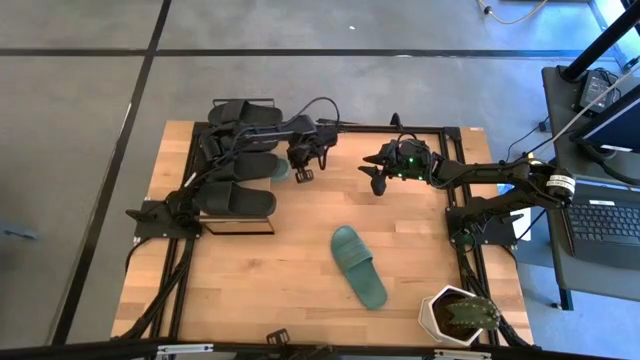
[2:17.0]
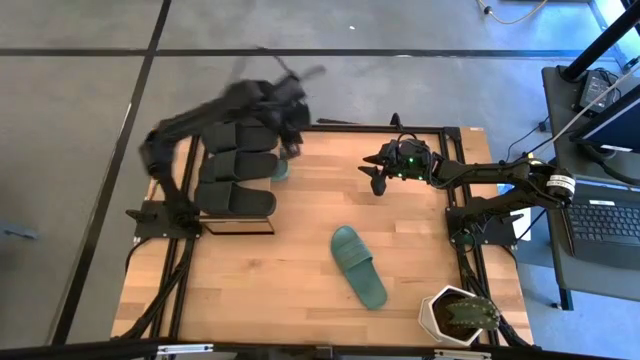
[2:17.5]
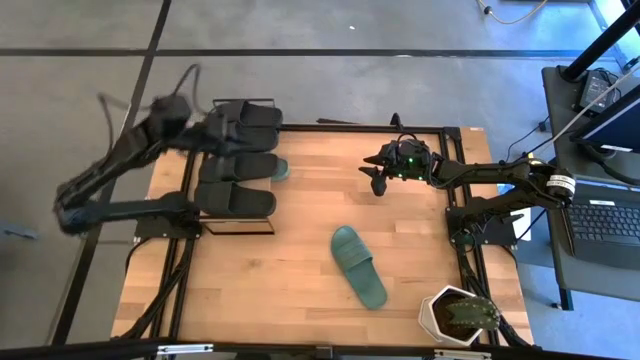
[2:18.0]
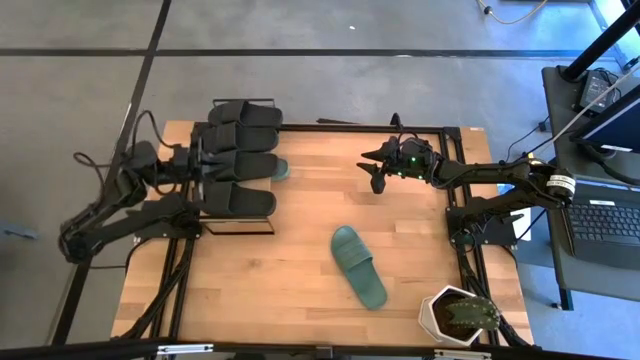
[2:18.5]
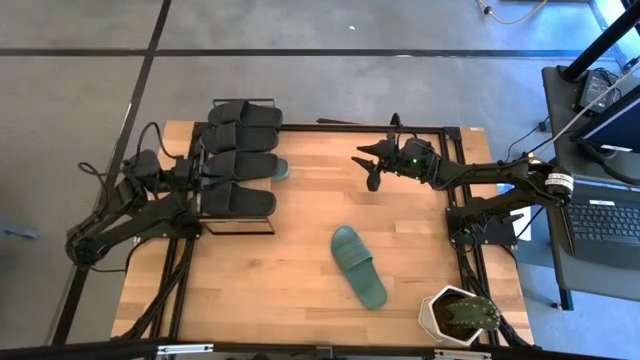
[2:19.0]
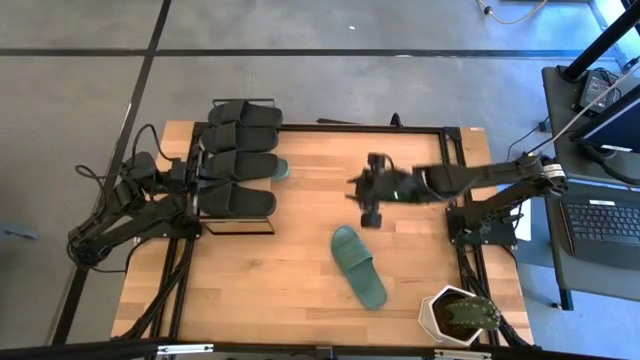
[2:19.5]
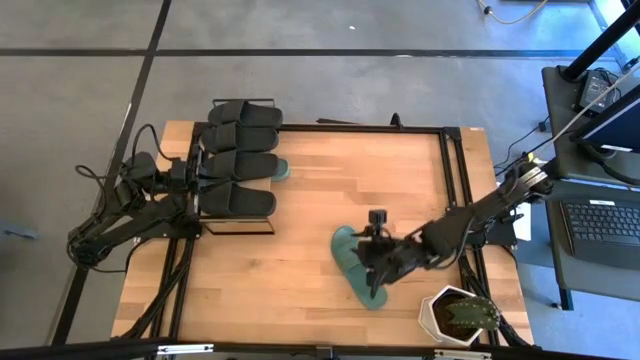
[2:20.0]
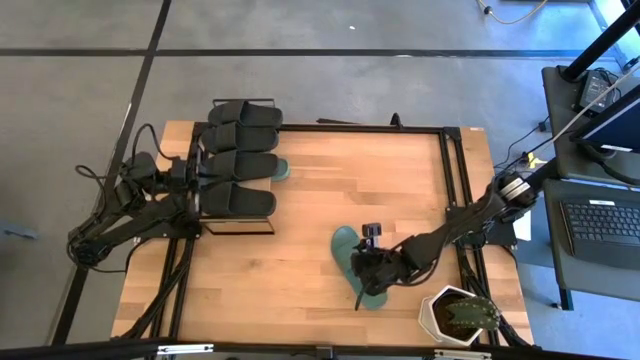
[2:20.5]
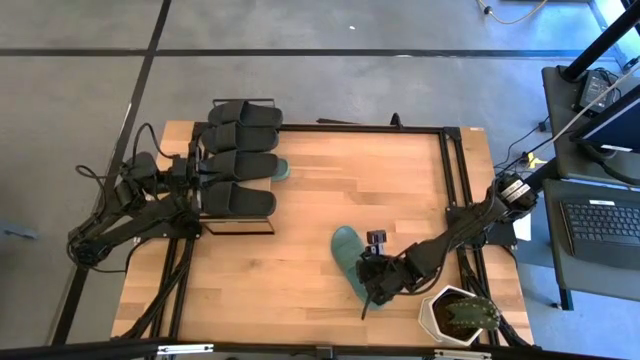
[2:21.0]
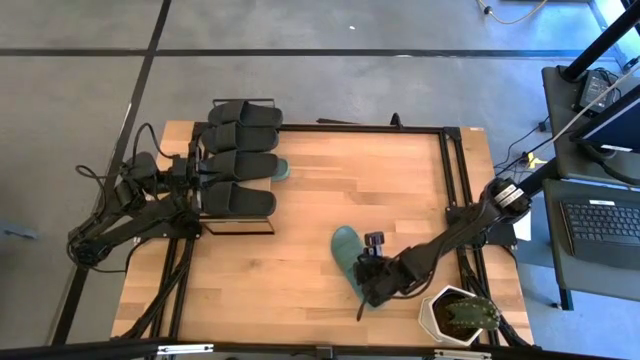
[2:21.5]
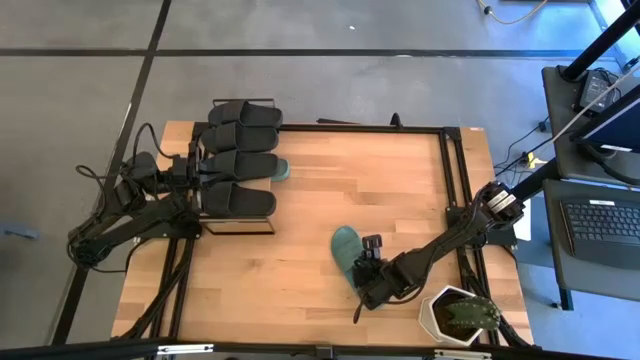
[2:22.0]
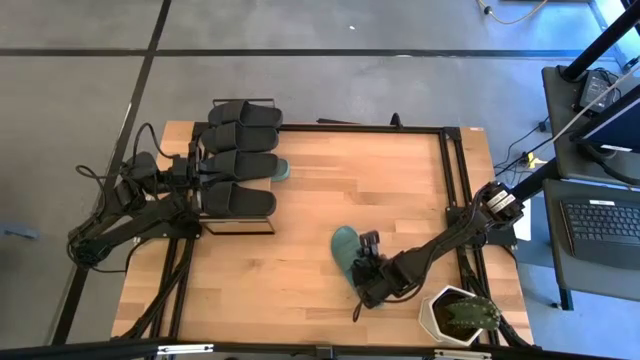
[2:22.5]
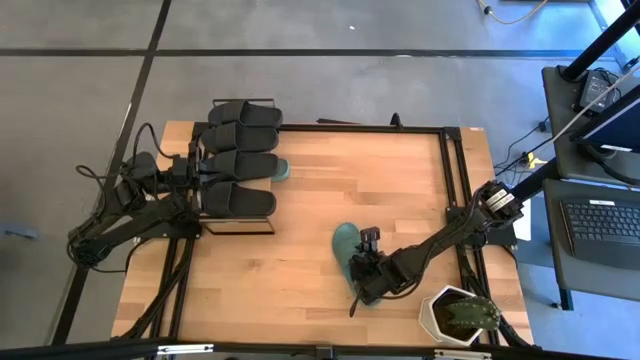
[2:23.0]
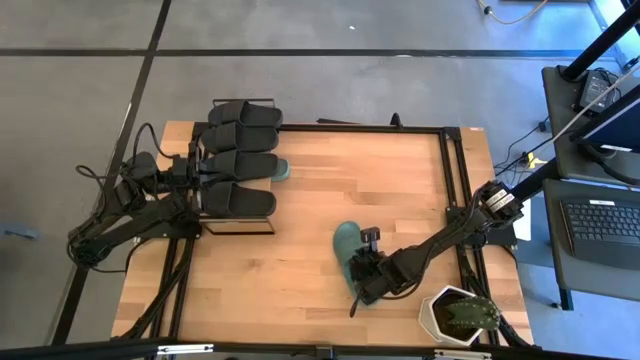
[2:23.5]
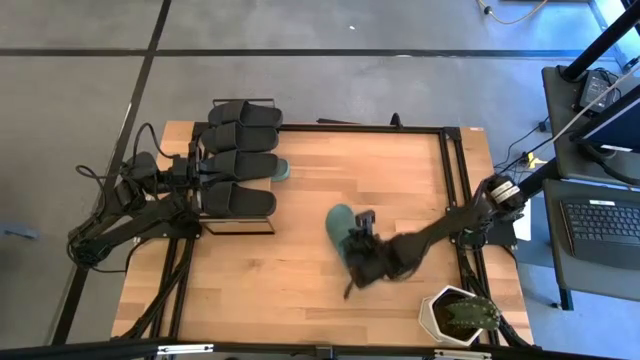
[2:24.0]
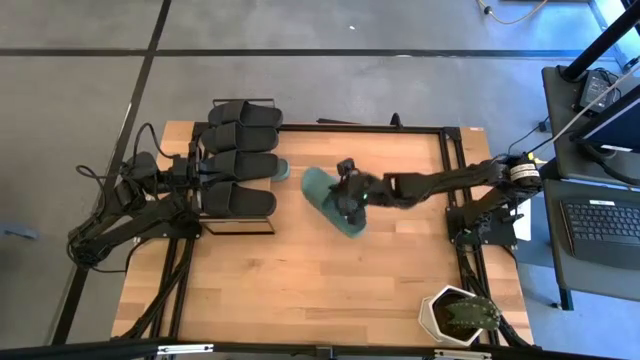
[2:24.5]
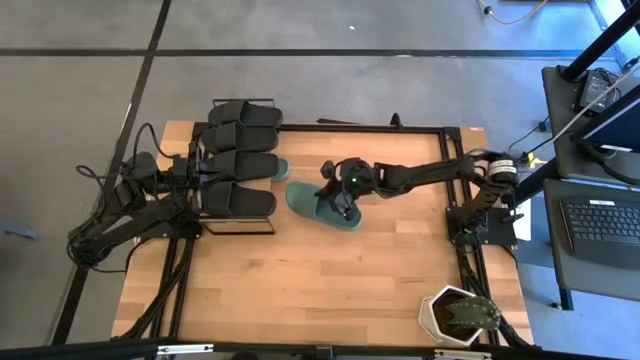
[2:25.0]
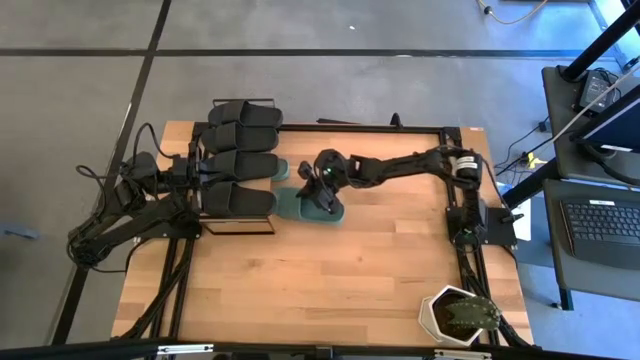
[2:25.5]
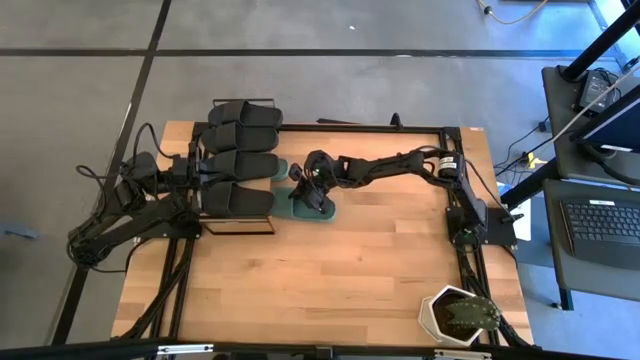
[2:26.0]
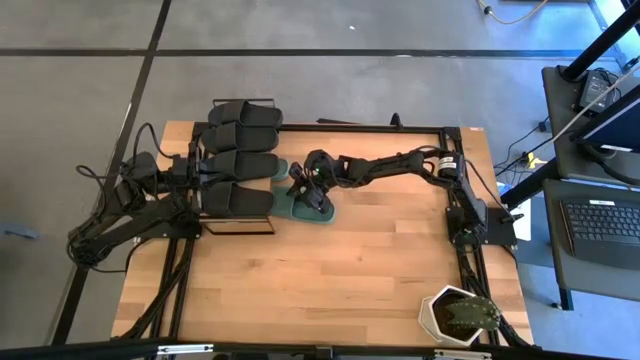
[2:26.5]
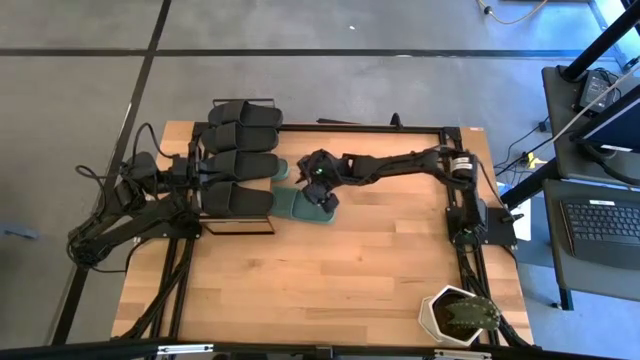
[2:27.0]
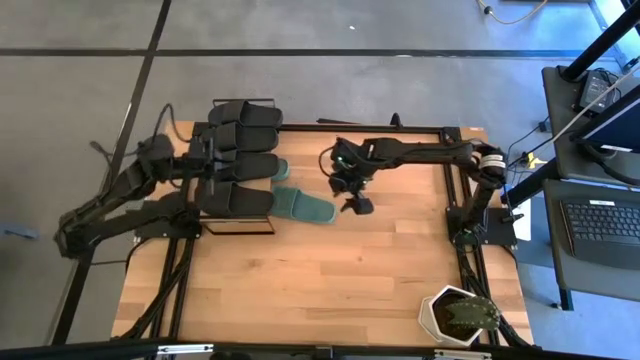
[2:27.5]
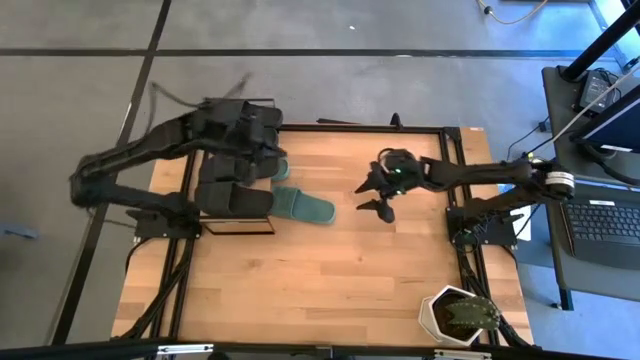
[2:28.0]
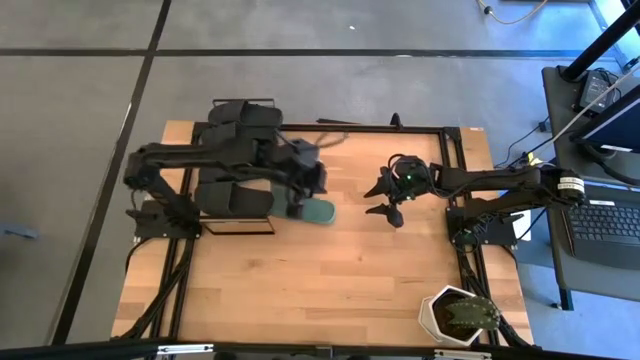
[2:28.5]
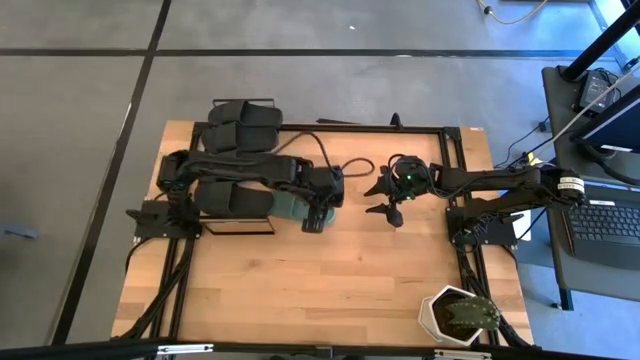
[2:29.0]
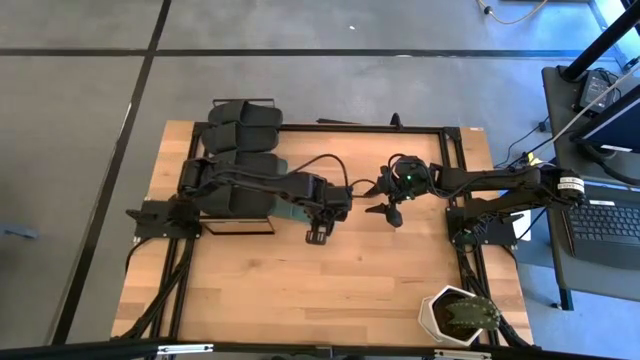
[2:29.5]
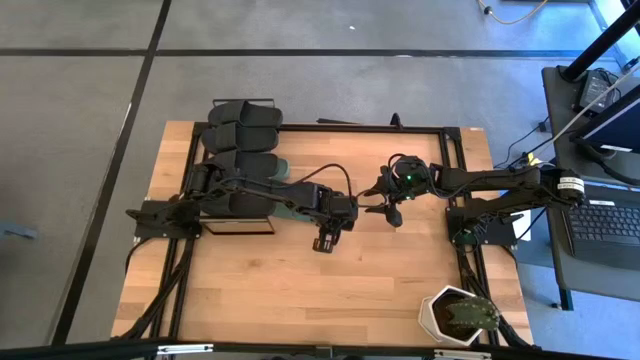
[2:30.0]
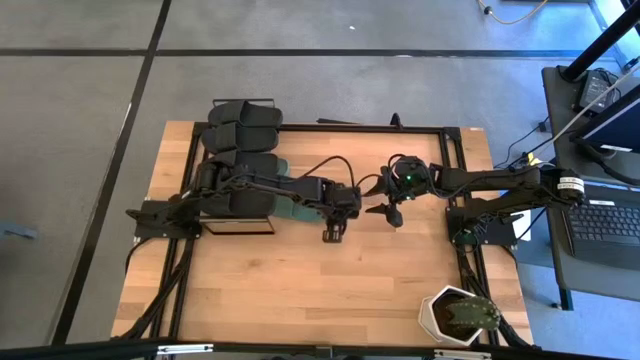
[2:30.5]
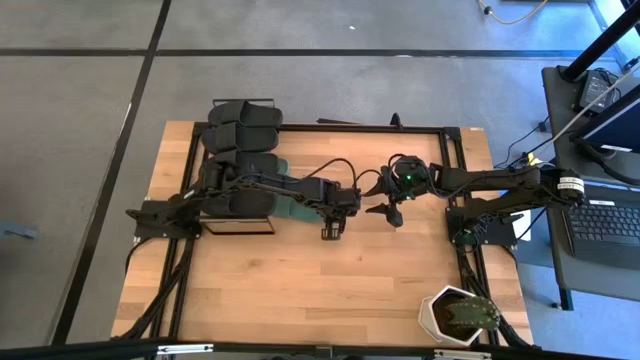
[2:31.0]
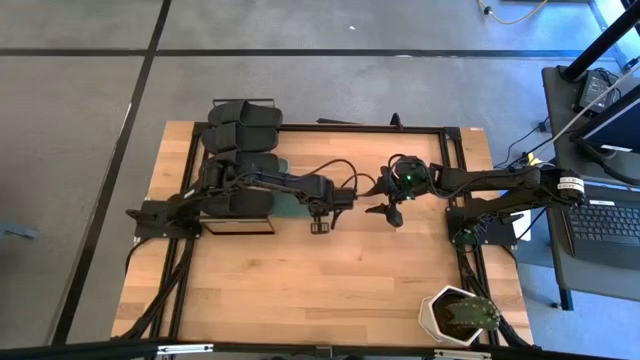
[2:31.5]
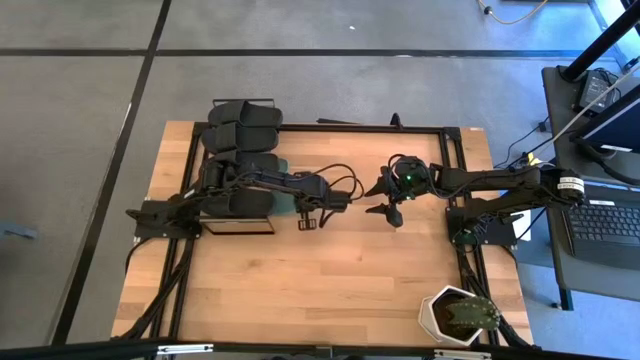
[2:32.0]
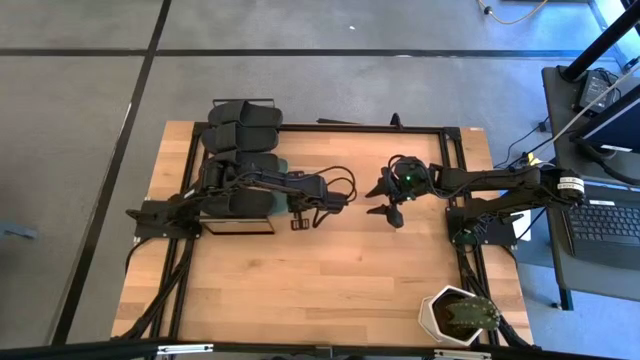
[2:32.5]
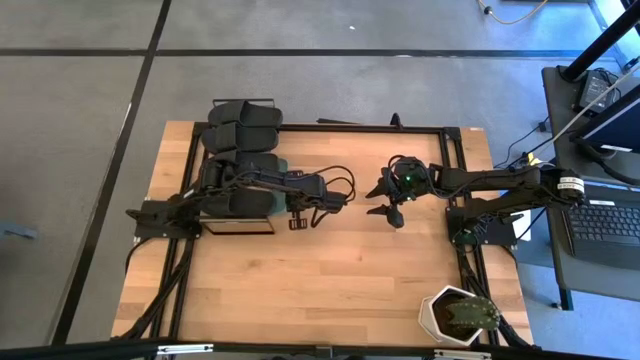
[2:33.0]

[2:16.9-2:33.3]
Task: Pick and place slides into the shelf
Put the green slipper under the shelf
